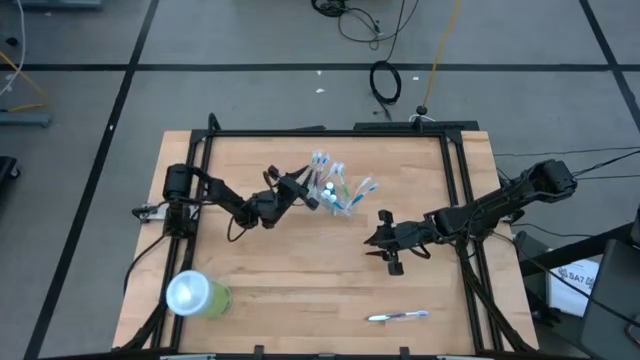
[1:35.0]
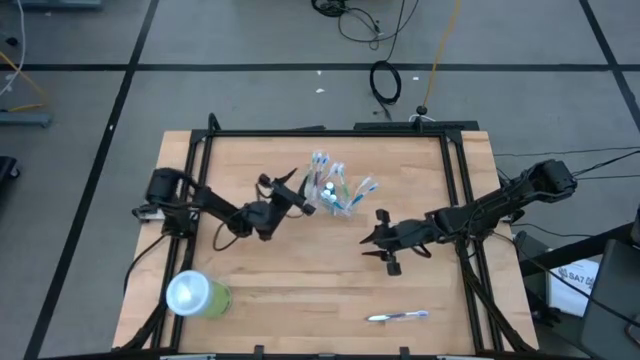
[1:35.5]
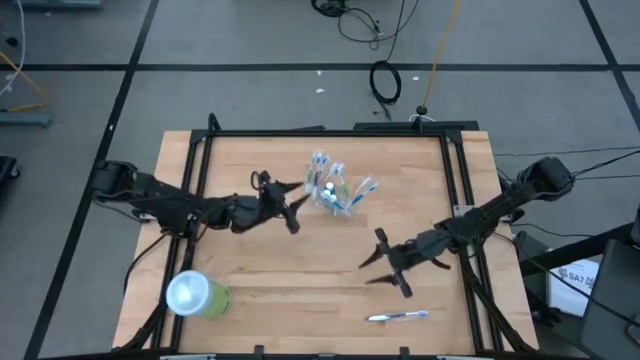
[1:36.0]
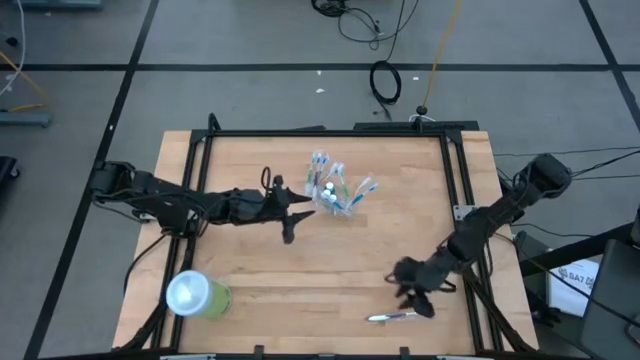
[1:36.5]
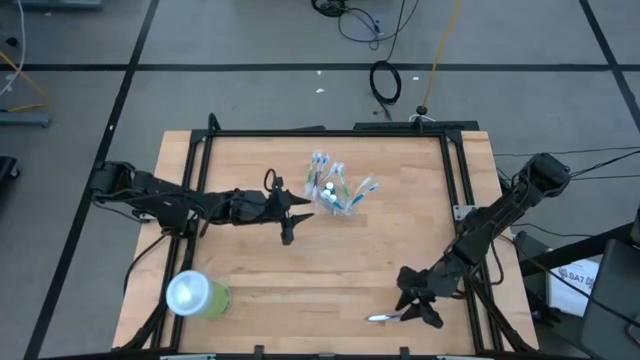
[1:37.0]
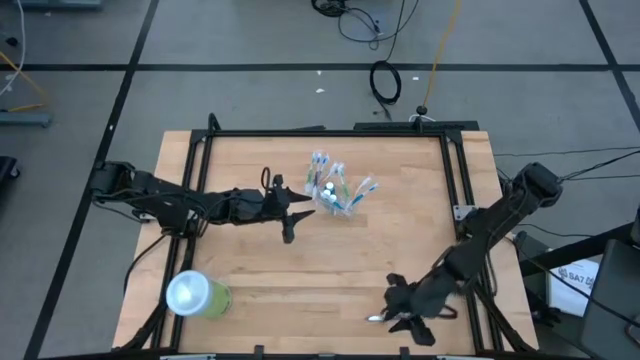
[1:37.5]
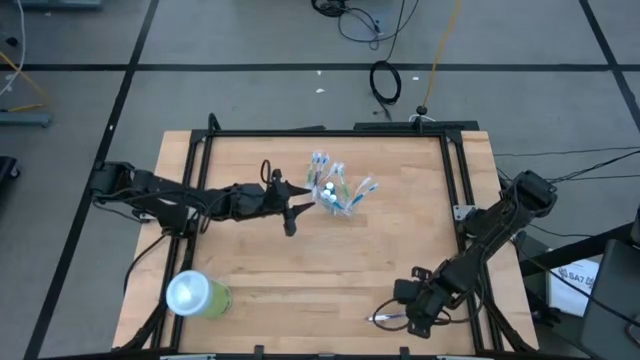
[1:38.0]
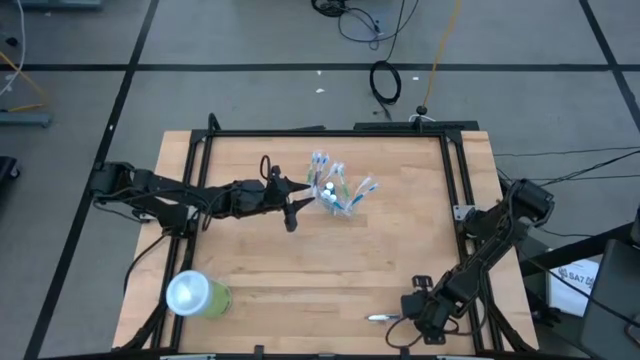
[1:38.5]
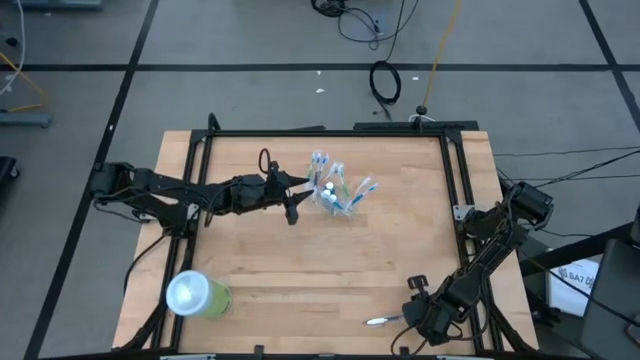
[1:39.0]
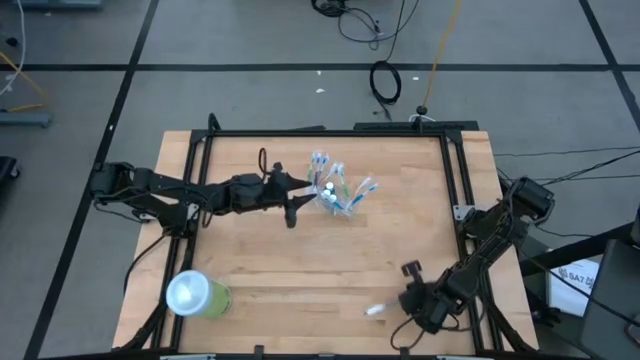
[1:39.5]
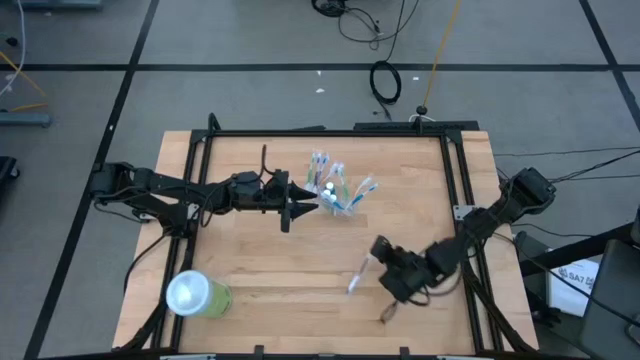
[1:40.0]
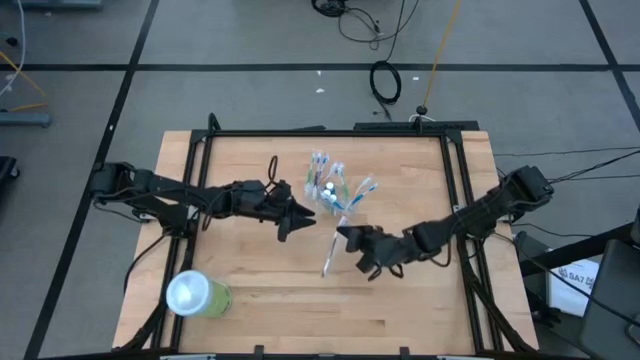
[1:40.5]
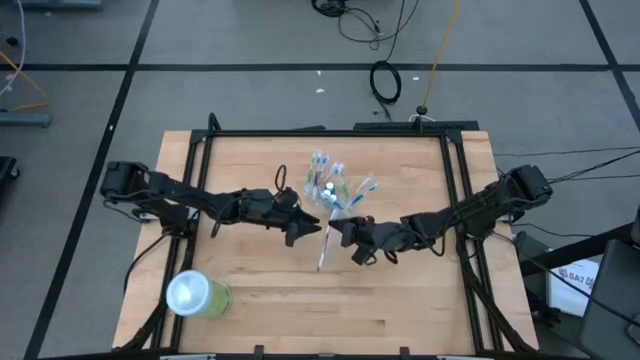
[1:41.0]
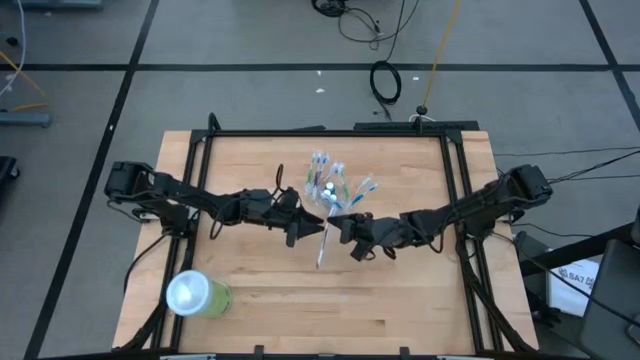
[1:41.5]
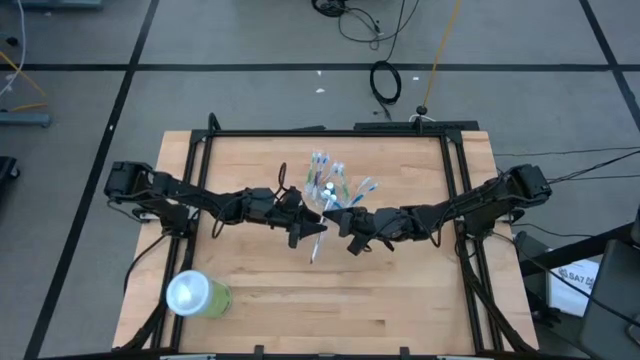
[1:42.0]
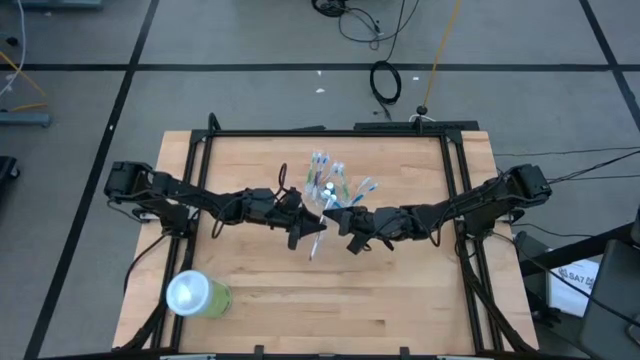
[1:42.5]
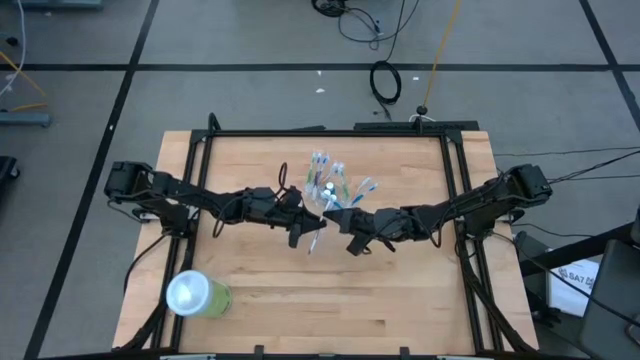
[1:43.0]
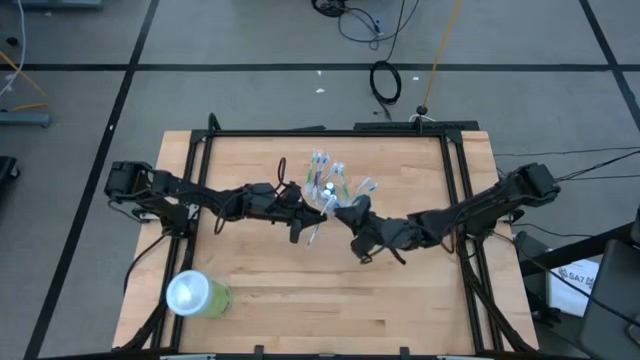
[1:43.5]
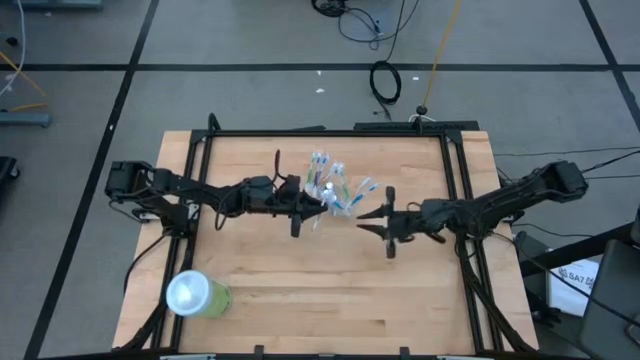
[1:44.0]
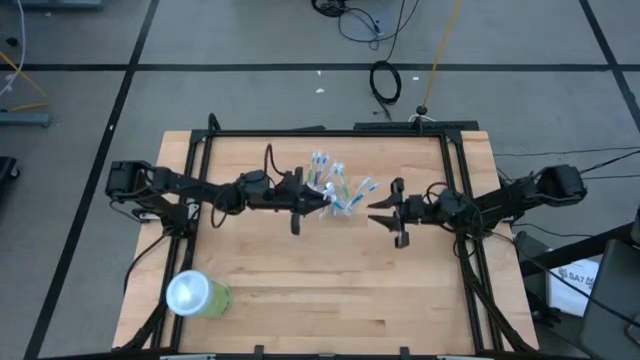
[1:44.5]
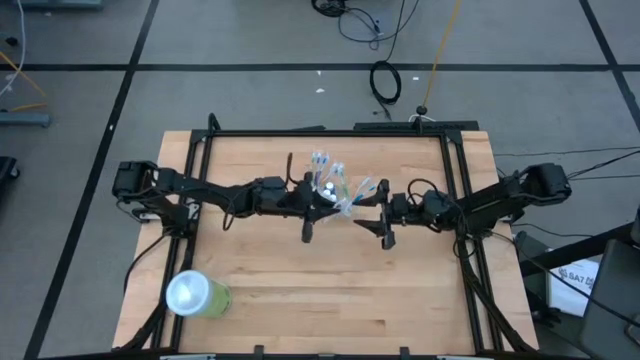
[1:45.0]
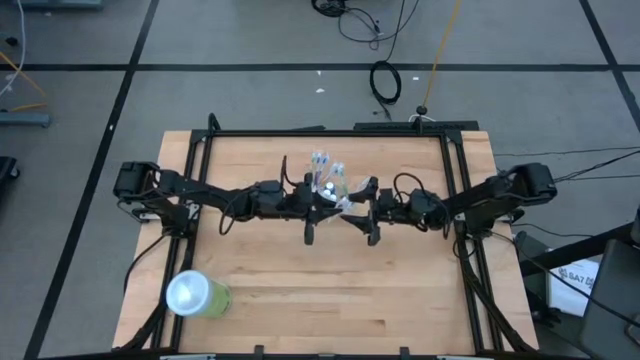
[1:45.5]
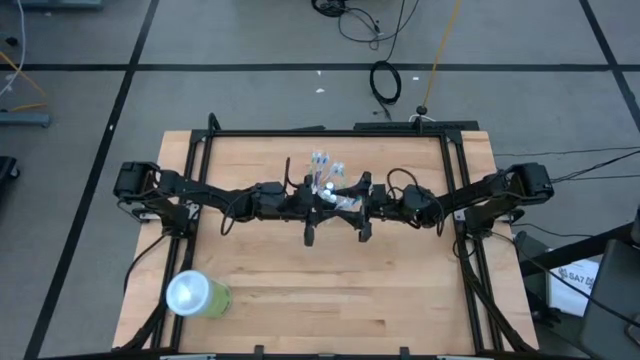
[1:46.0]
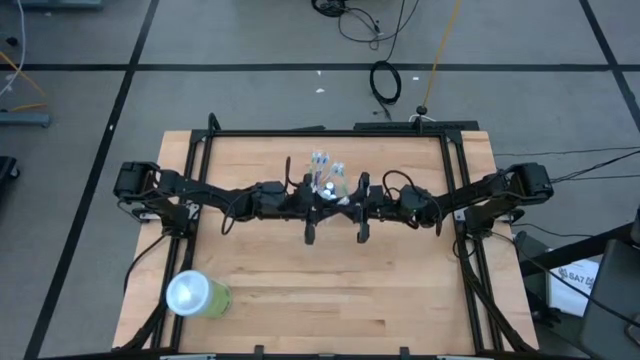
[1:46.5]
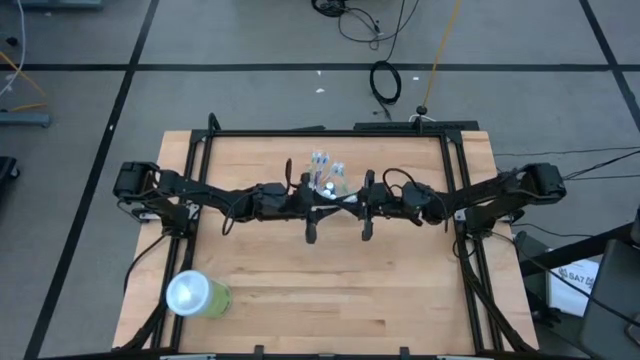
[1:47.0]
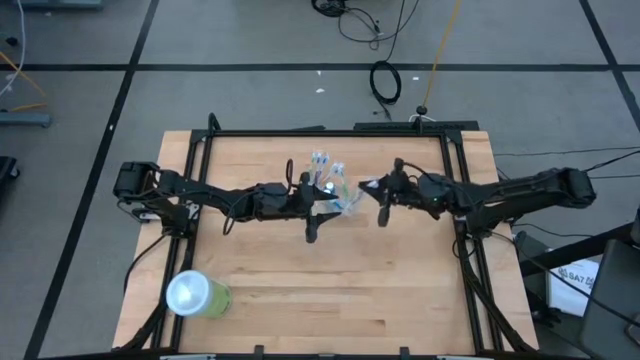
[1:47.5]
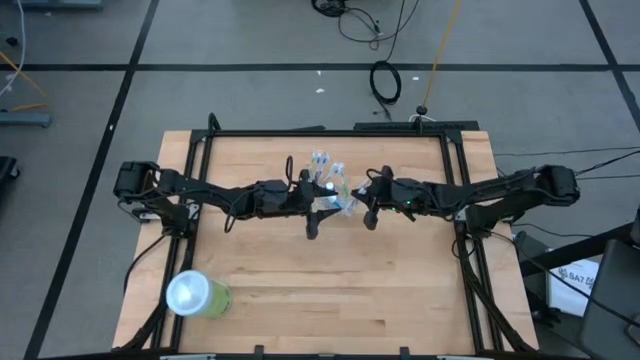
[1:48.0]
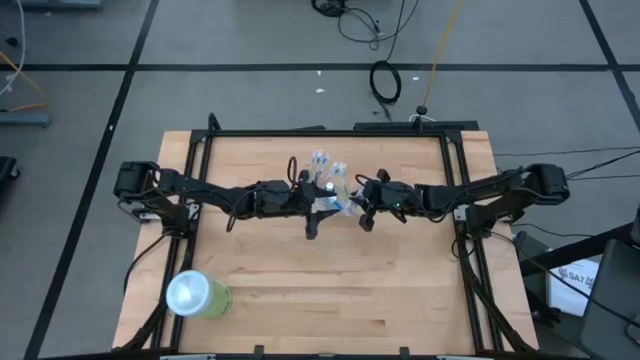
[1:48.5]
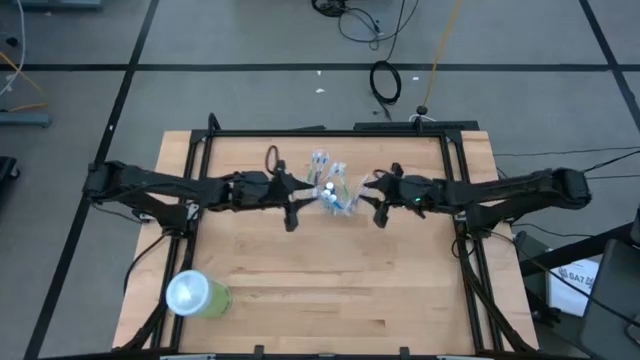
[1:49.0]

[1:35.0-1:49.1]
Task: Pick & Place toothbrushing station
Put the purple toothbrush into the transparent organizer

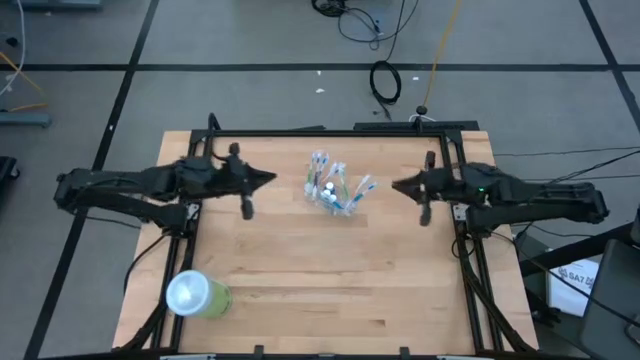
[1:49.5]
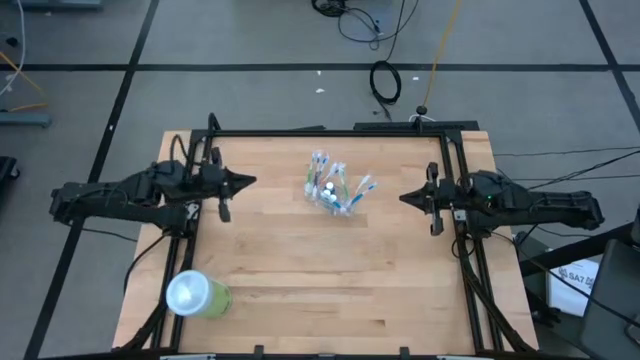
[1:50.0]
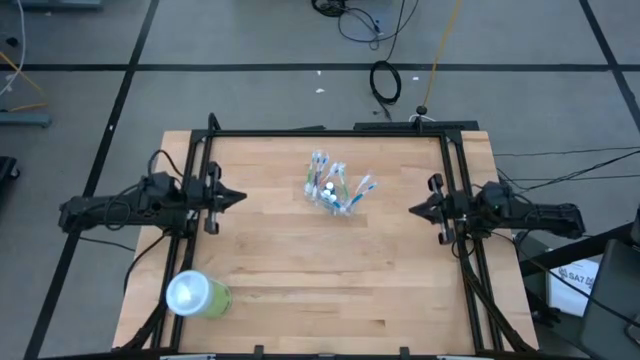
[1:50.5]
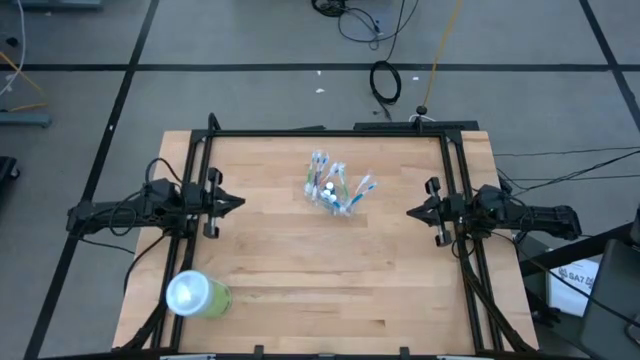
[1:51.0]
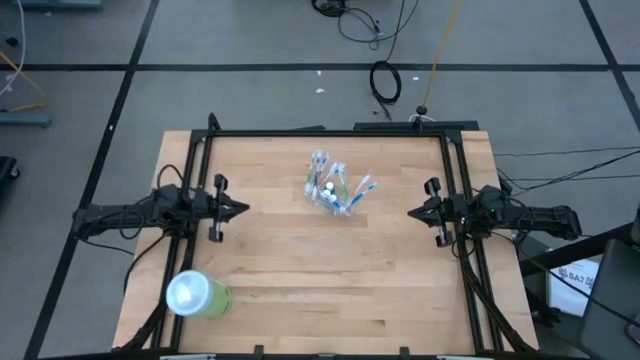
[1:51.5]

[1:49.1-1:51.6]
Return to Home Position

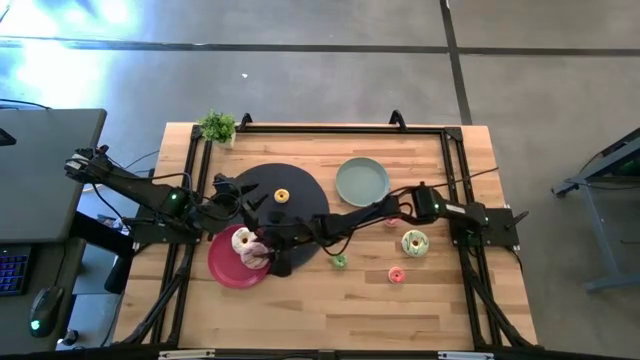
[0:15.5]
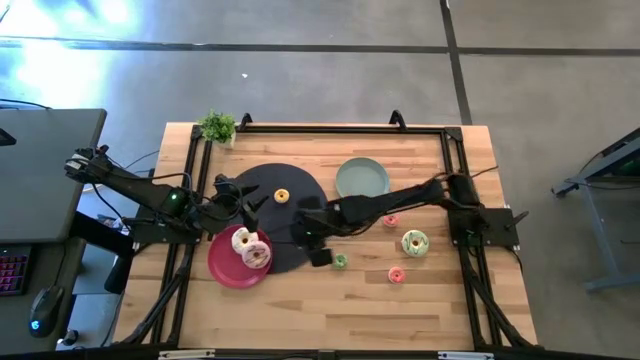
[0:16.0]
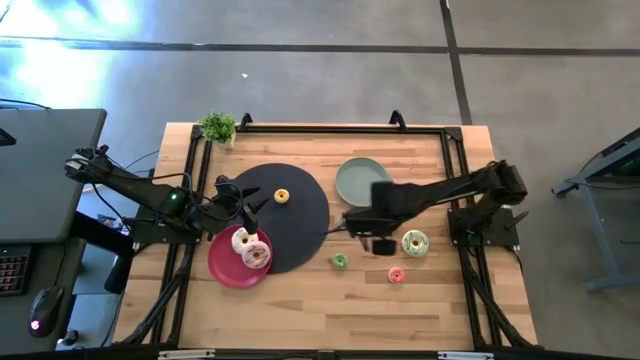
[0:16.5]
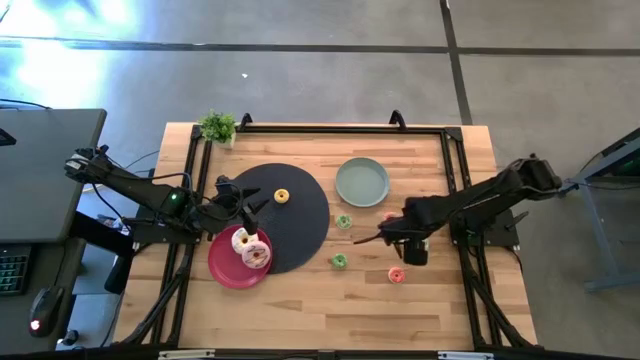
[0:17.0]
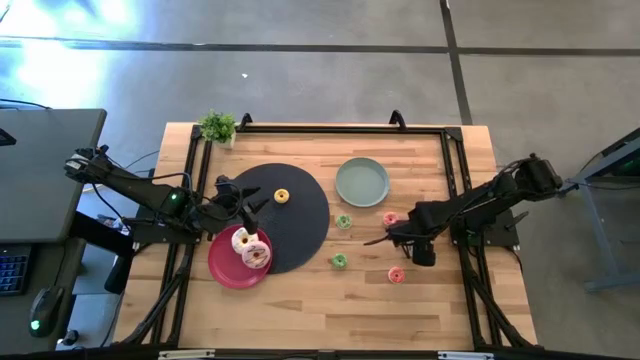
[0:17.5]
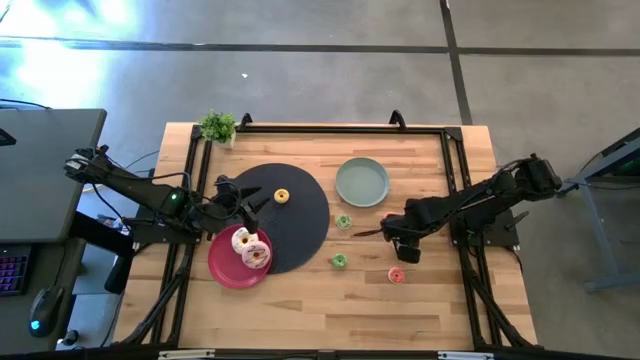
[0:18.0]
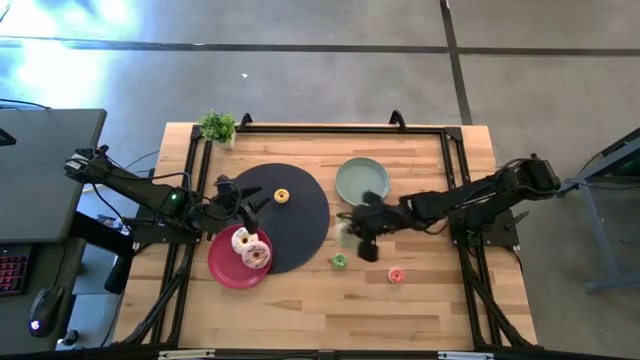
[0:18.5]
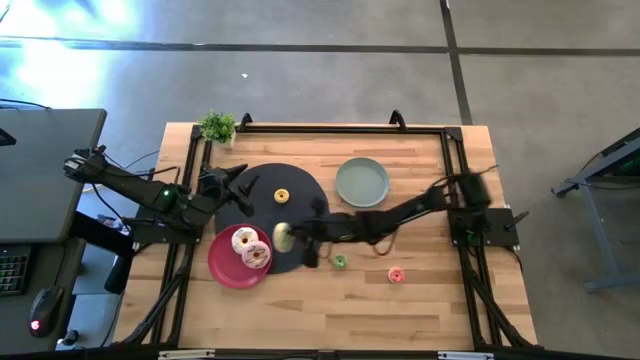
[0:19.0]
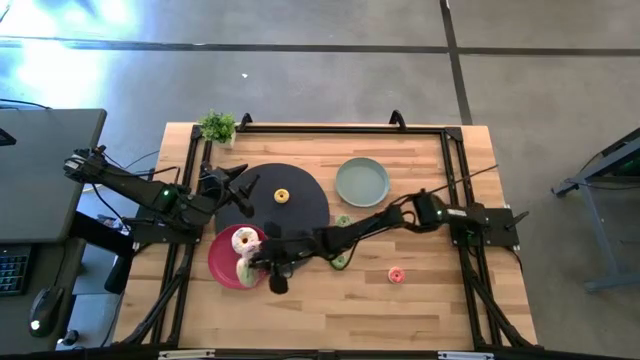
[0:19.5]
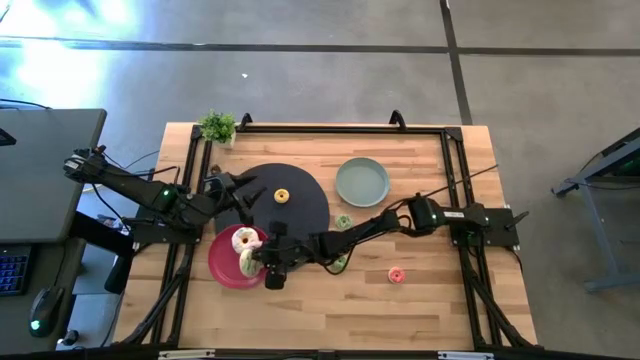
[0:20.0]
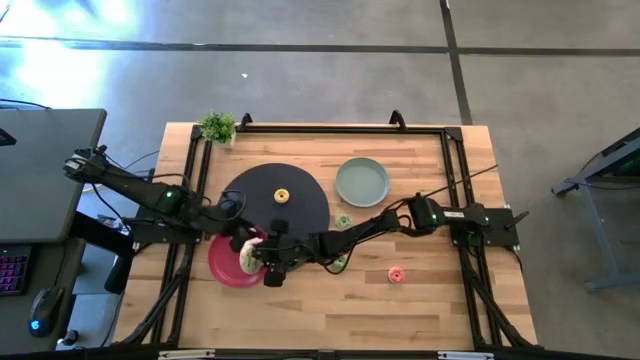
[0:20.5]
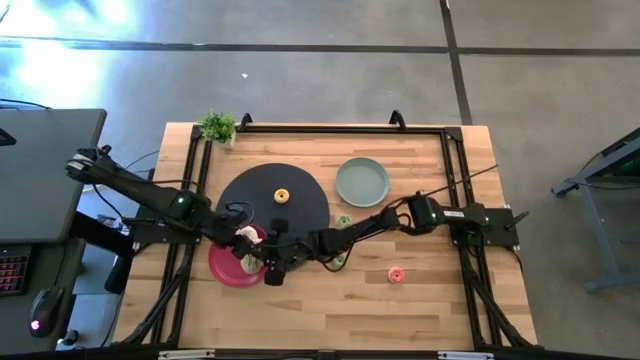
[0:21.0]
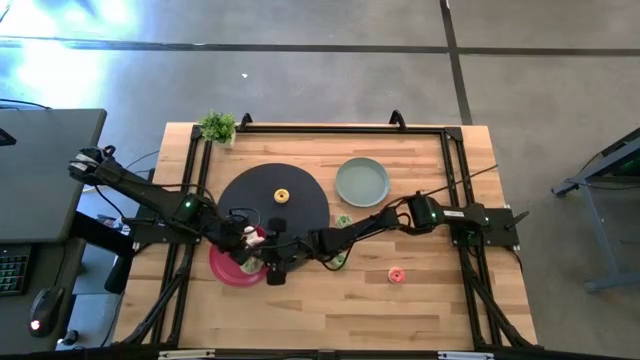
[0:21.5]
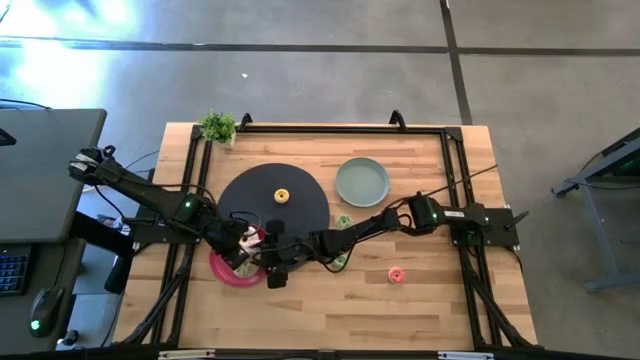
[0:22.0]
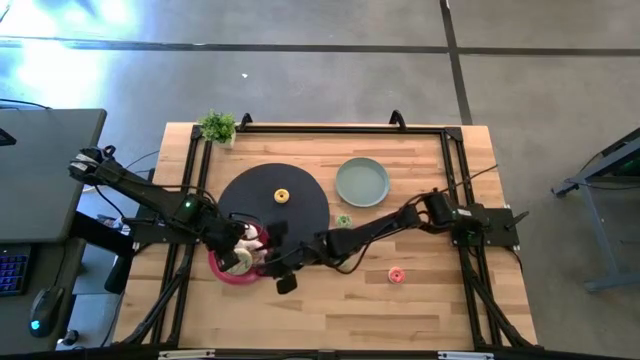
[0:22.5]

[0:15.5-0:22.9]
Task: Pick & Place donuts
Put the big blue donut on the red plate
